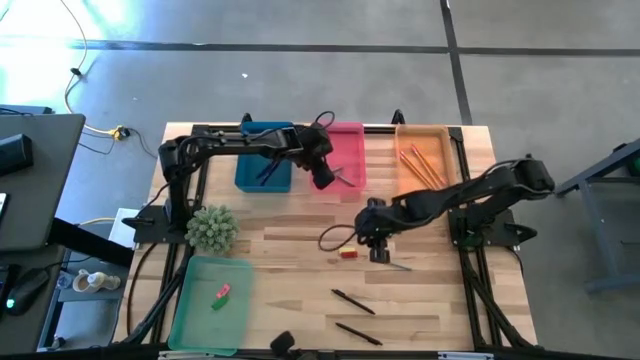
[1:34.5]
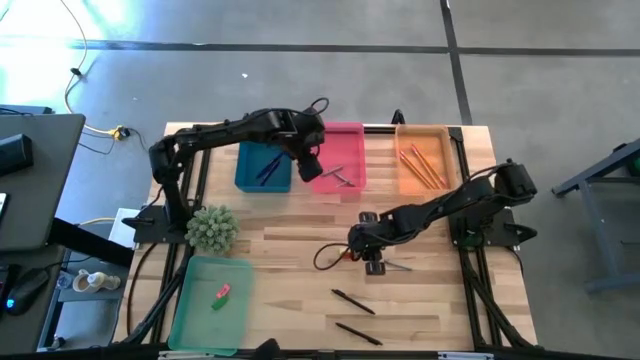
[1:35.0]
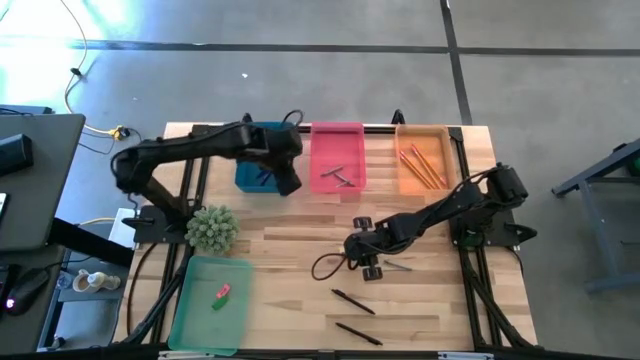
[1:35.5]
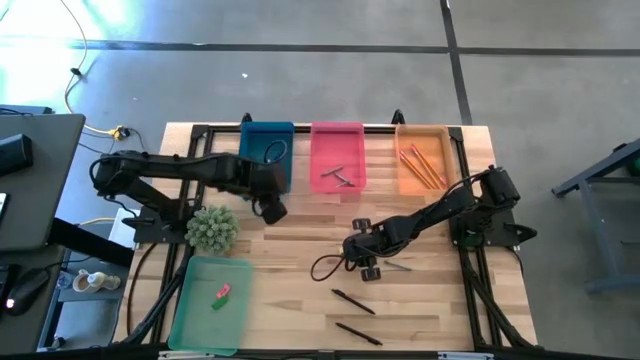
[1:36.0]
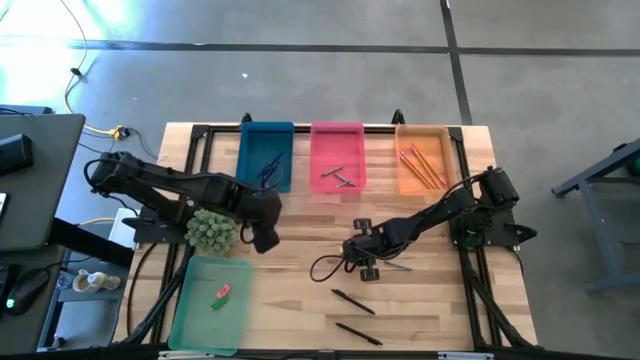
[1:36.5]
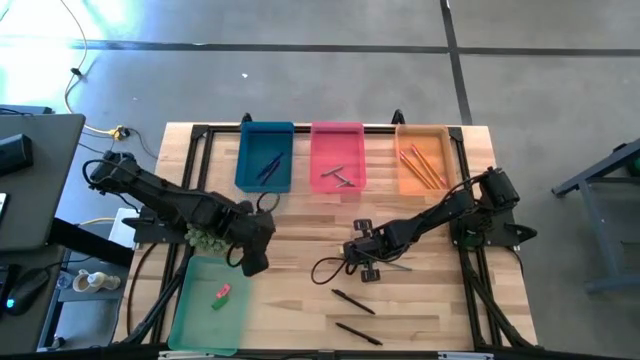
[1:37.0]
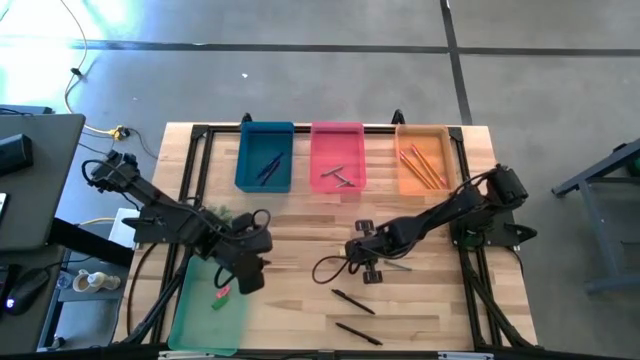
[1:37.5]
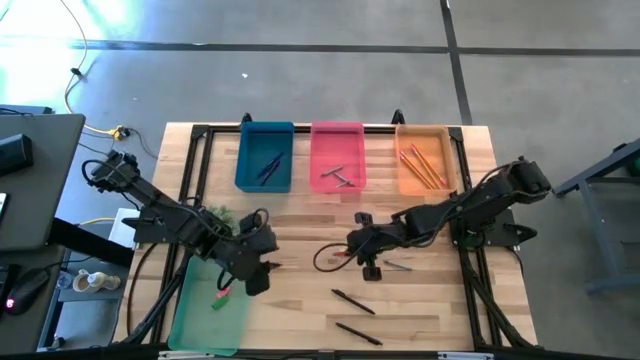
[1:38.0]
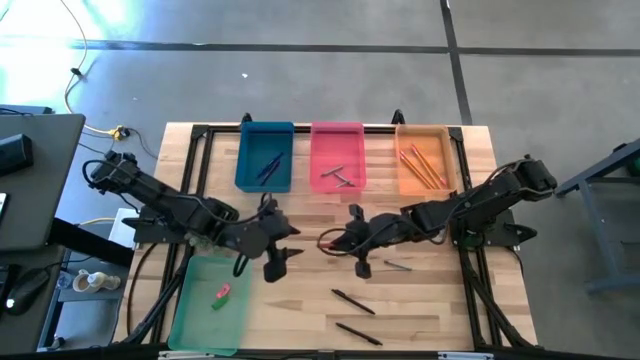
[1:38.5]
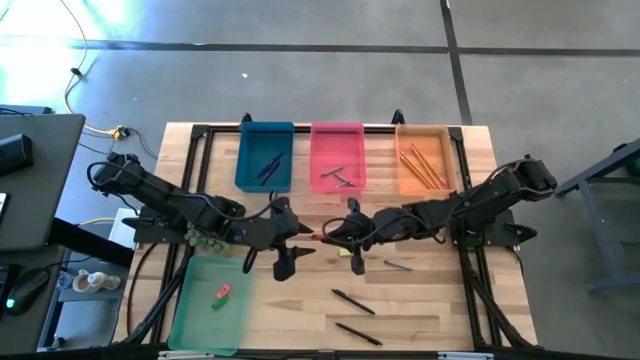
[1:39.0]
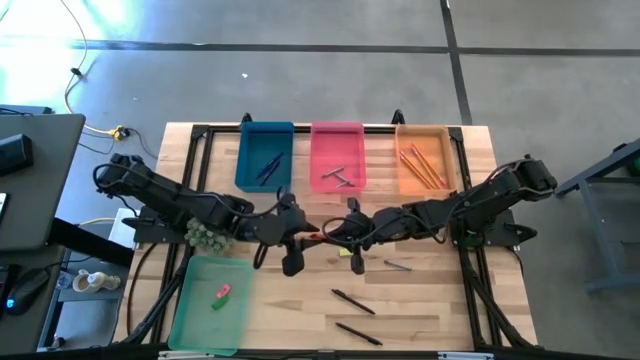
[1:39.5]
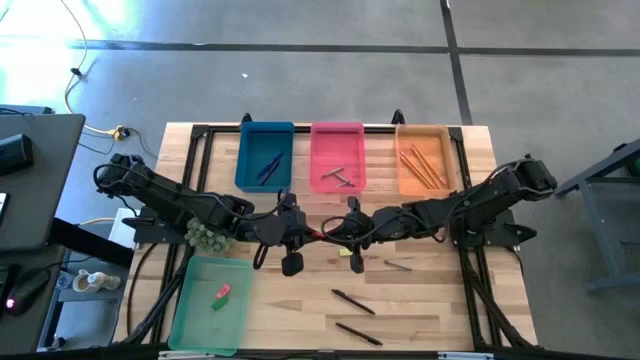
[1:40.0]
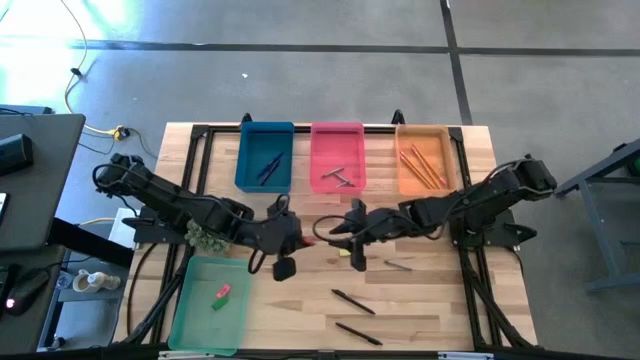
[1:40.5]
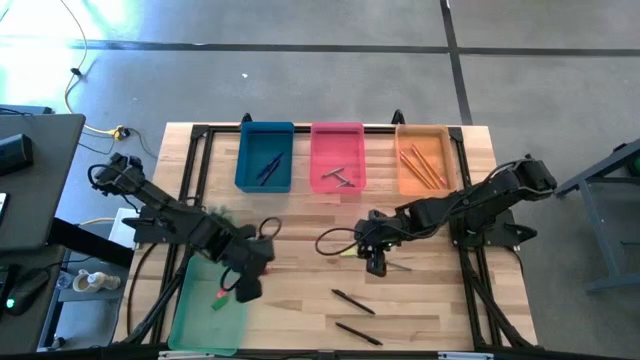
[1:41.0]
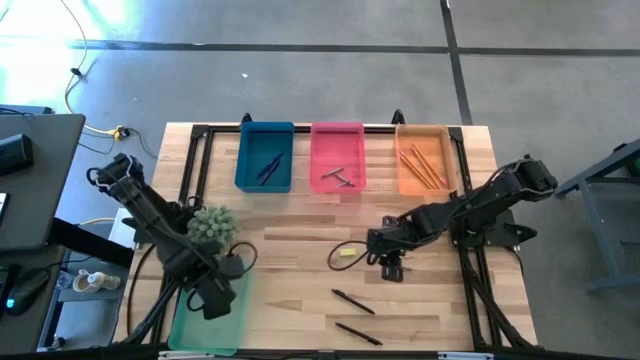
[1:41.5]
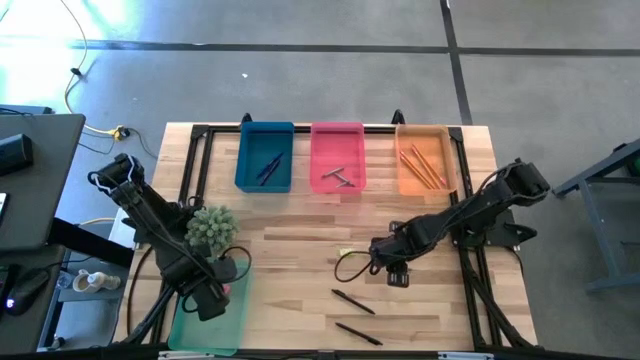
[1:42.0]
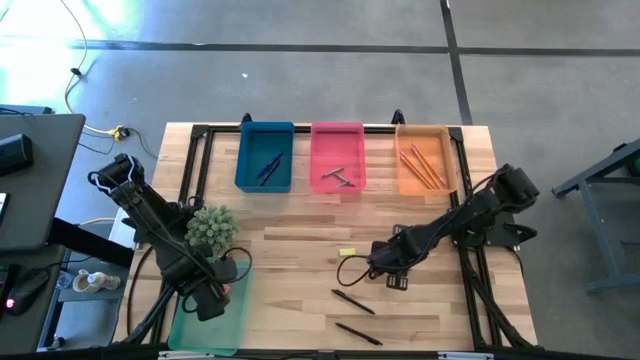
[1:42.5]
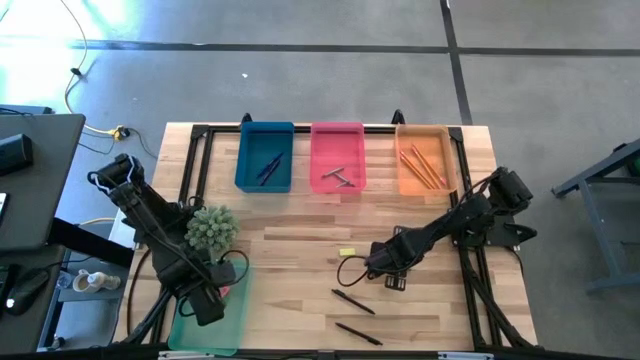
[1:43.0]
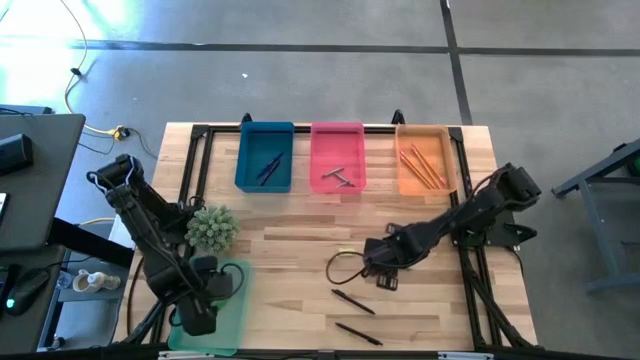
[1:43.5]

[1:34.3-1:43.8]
Task: Sort crayons/erasers/pens/pencils in bins
Put the red eraser into the green bin

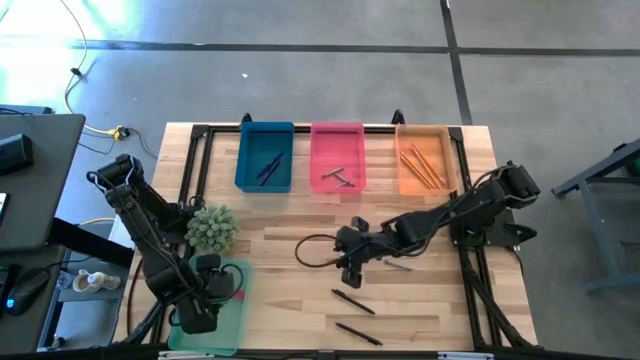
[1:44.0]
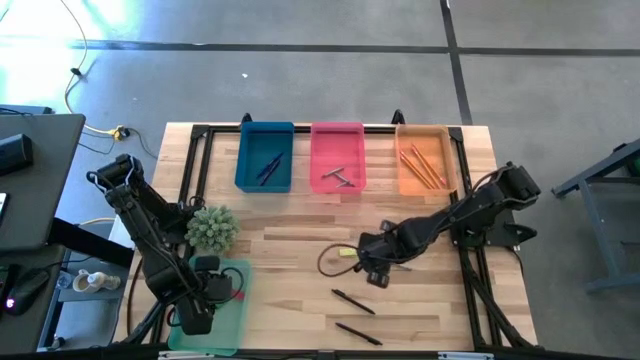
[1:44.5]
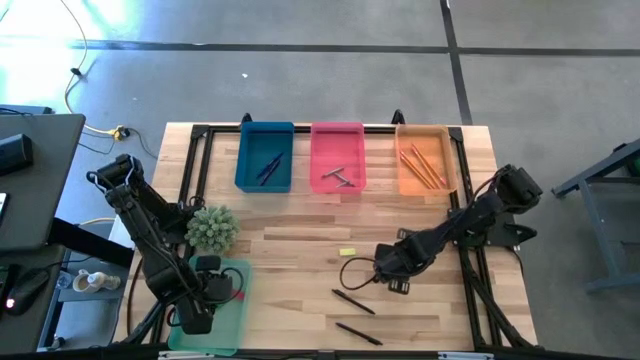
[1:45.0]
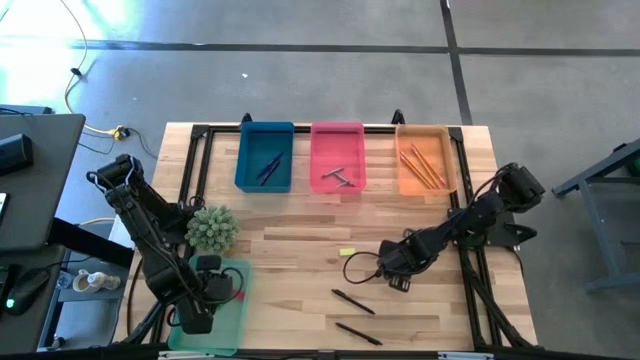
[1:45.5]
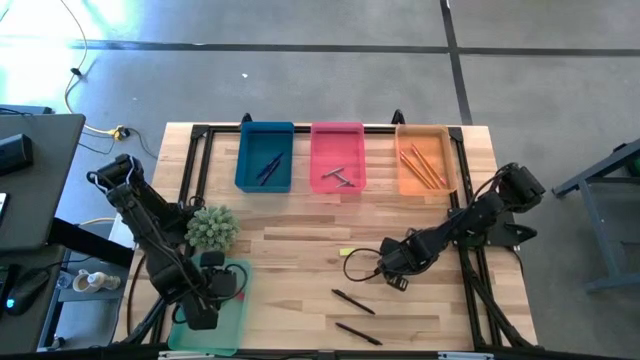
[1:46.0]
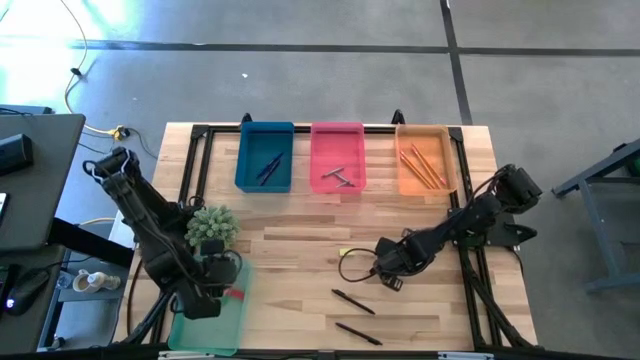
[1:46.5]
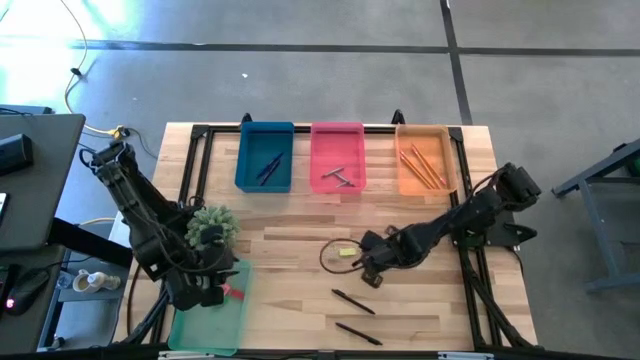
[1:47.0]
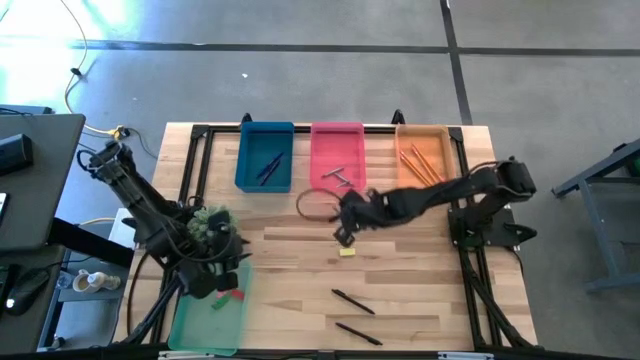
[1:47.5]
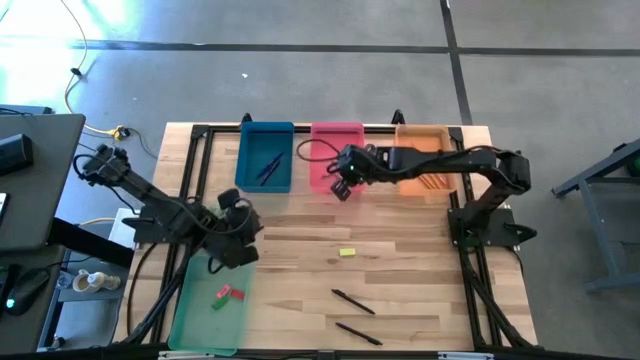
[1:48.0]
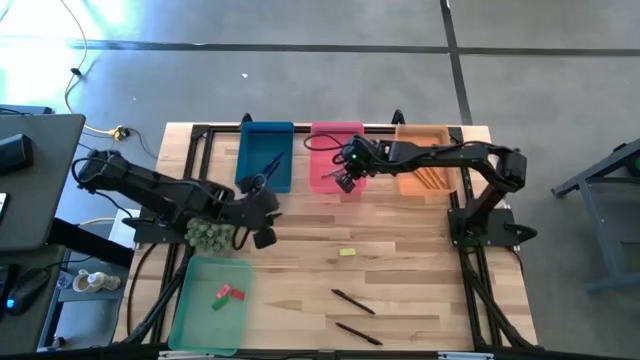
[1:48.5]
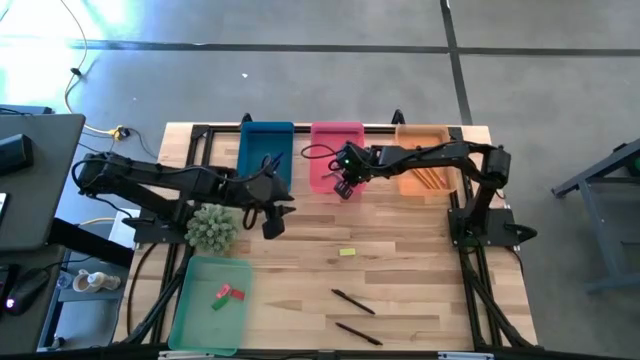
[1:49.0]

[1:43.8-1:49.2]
Put the gray crayon into the pink bin

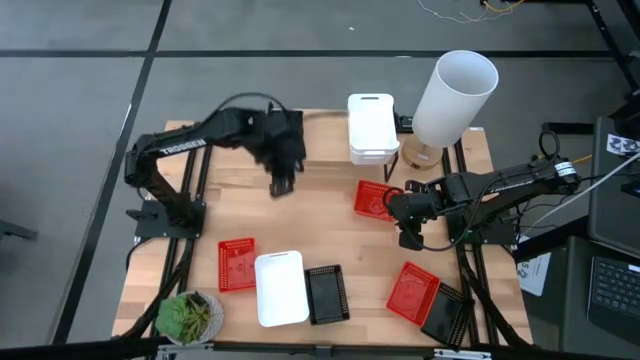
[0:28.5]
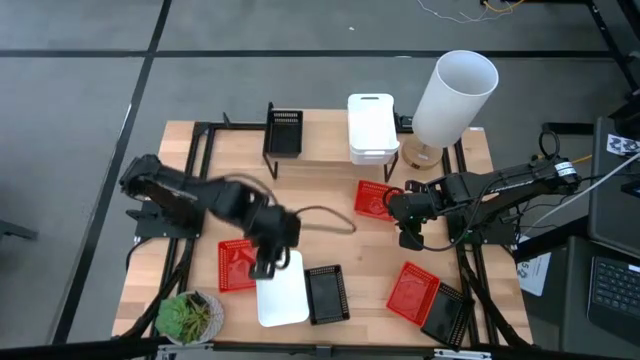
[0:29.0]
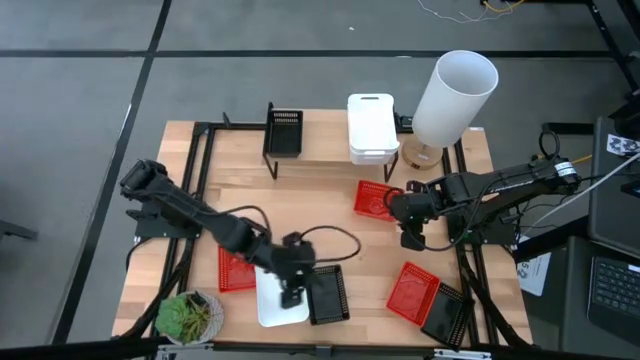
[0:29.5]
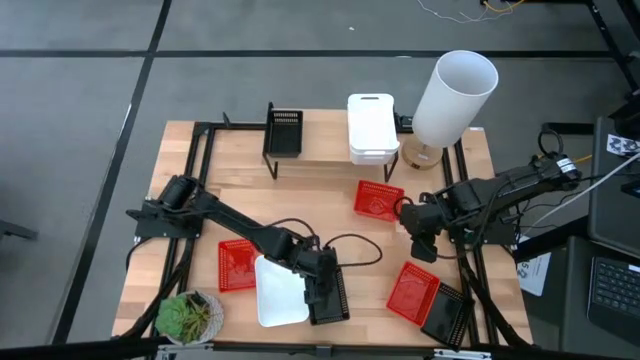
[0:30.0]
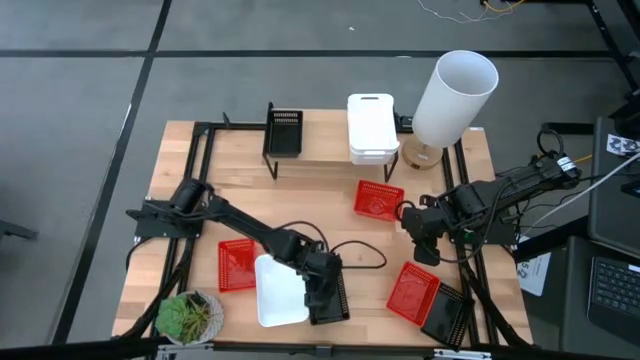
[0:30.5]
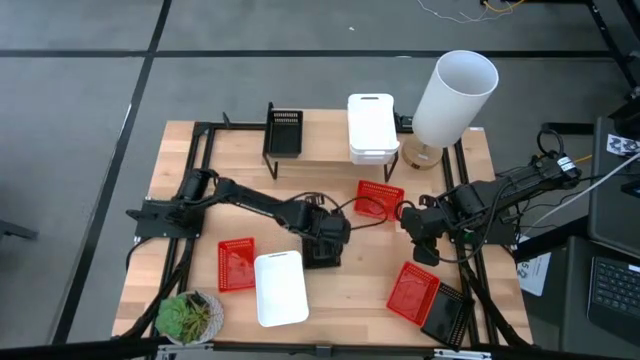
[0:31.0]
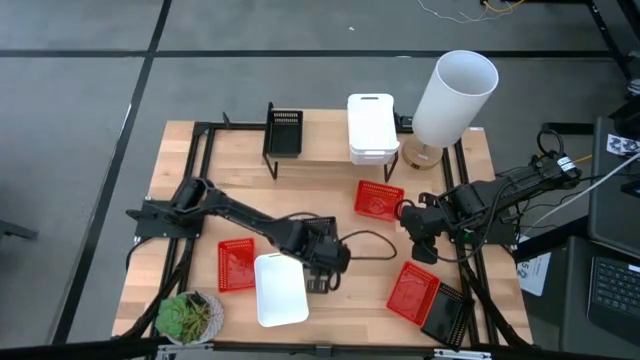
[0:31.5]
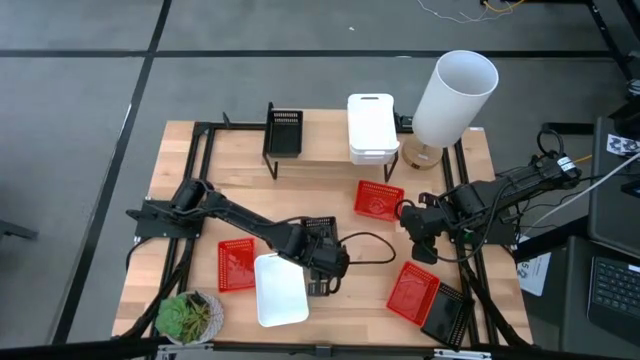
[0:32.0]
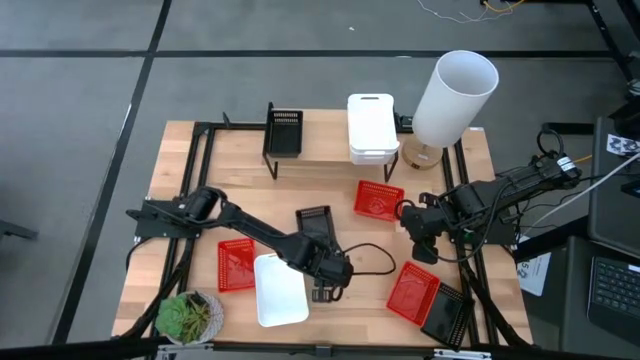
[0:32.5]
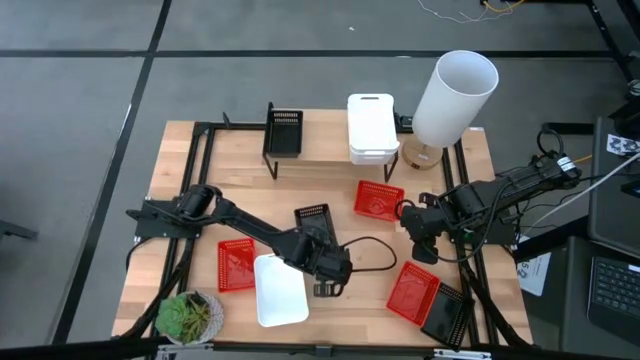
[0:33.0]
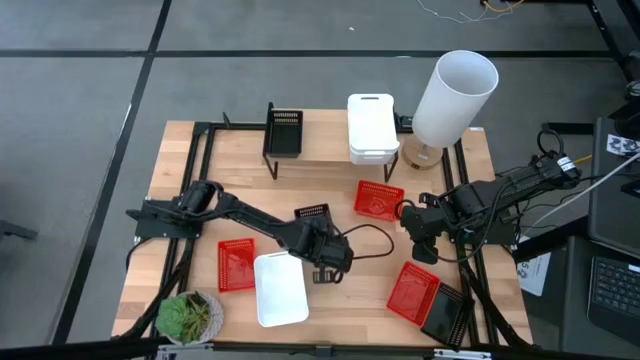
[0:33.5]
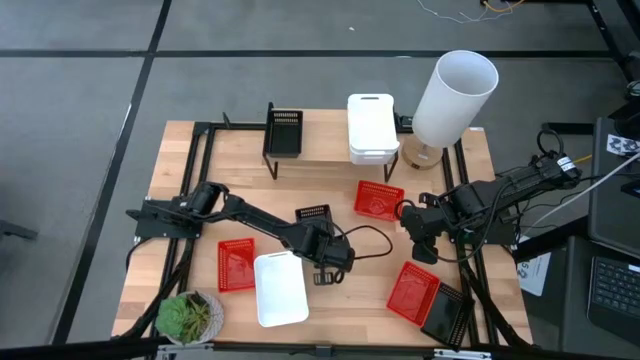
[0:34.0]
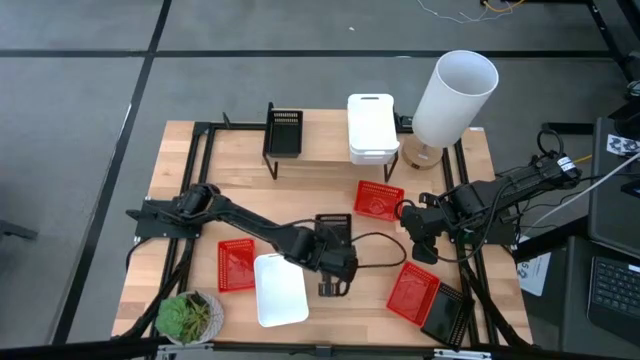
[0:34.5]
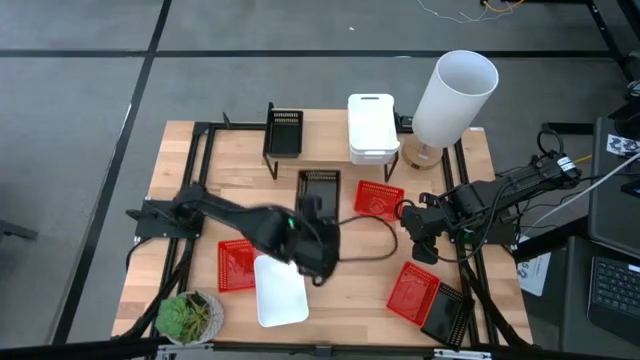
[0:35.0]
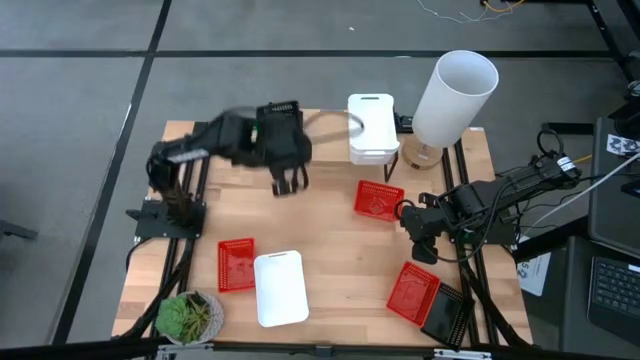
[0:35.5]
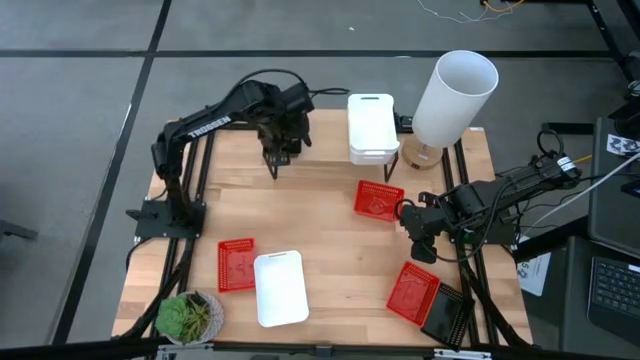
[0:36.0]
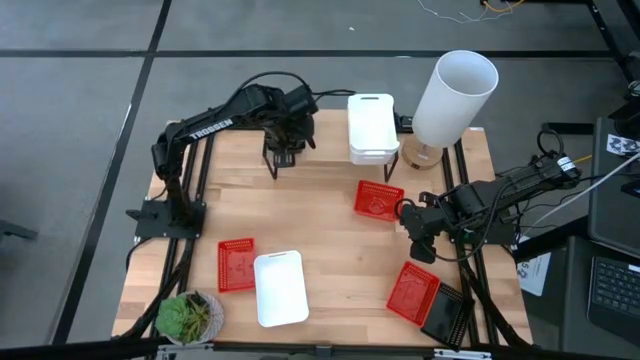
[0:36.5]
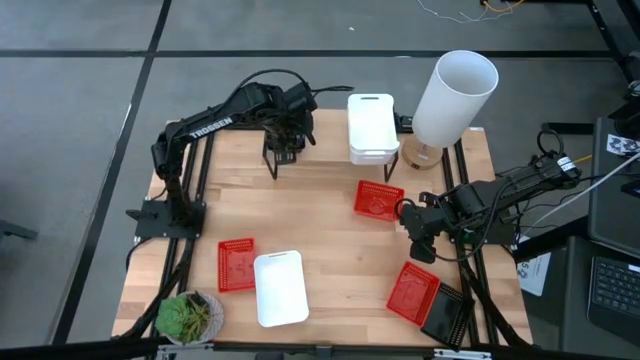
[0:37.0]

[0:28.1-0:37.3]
Task: Stack baskets on shelf by color
Stack the left black bin on top of the black bin on the shelf
